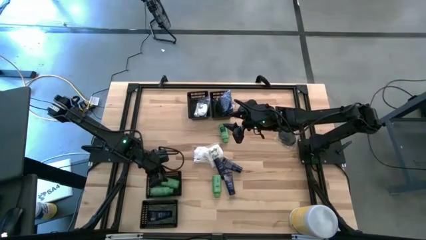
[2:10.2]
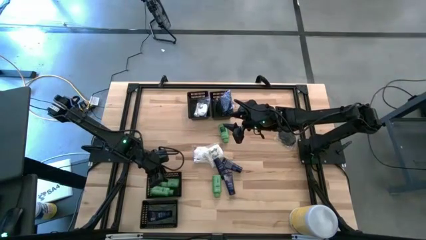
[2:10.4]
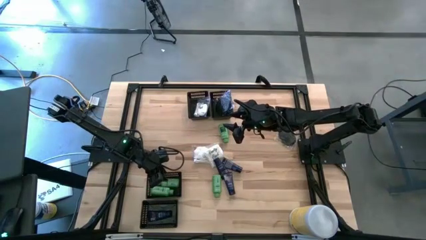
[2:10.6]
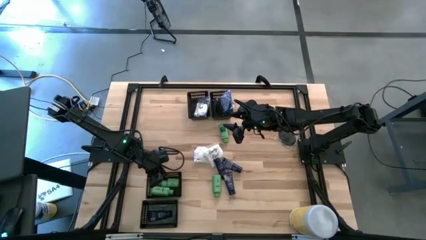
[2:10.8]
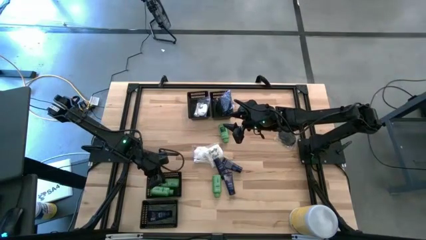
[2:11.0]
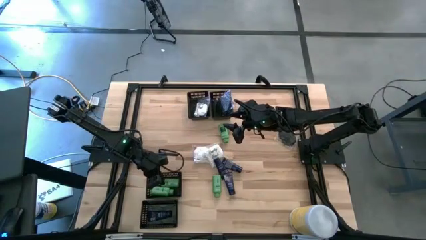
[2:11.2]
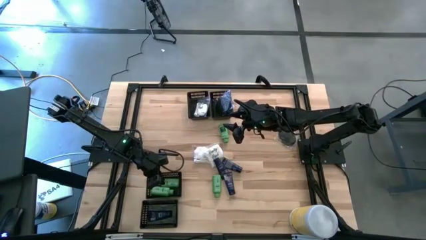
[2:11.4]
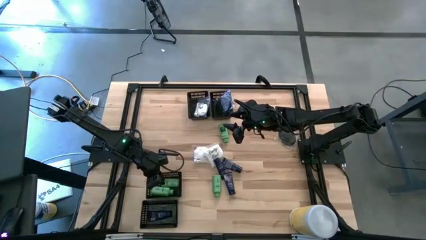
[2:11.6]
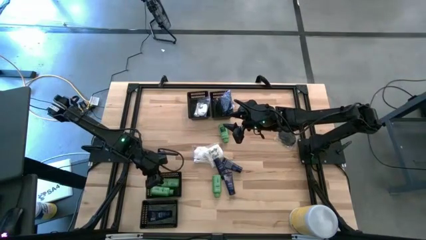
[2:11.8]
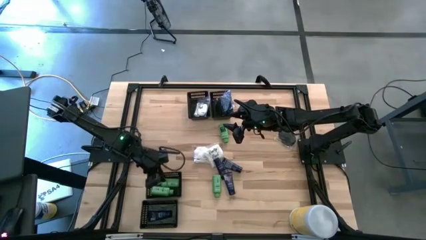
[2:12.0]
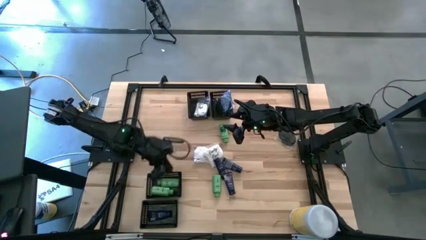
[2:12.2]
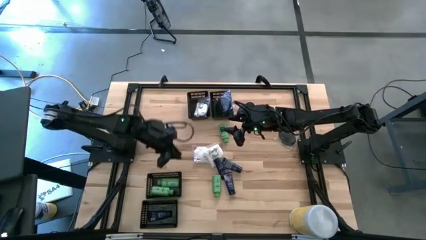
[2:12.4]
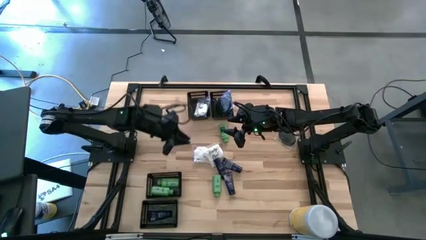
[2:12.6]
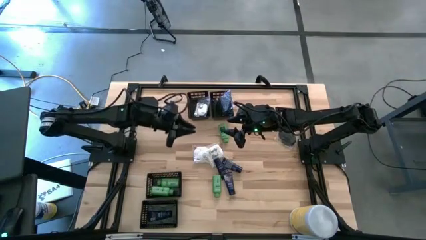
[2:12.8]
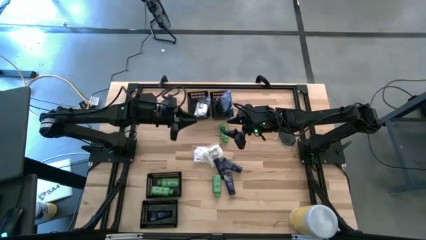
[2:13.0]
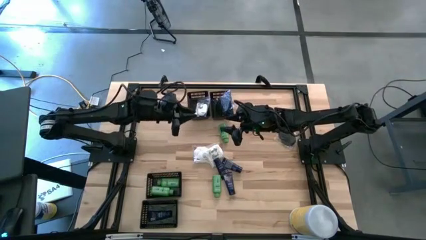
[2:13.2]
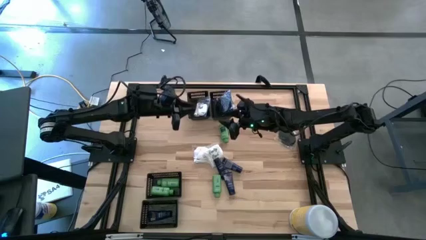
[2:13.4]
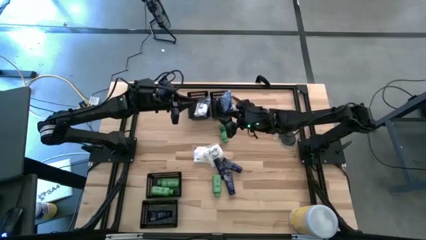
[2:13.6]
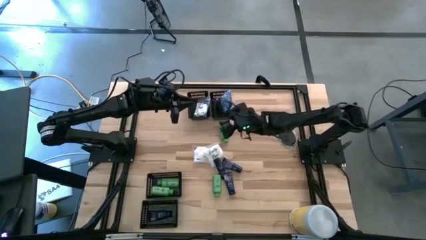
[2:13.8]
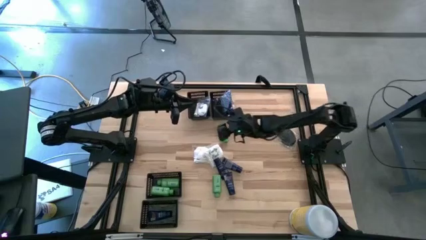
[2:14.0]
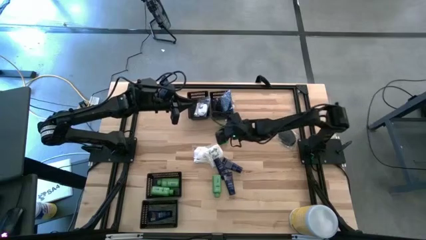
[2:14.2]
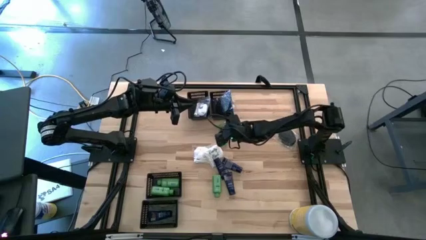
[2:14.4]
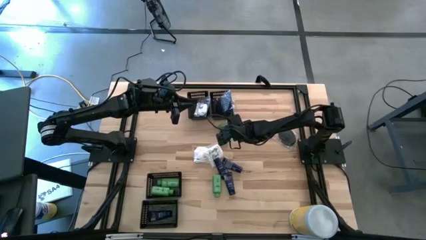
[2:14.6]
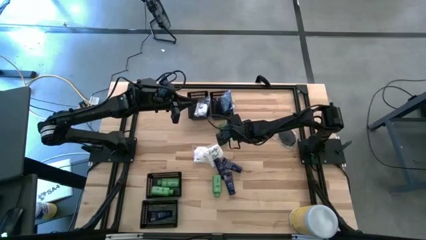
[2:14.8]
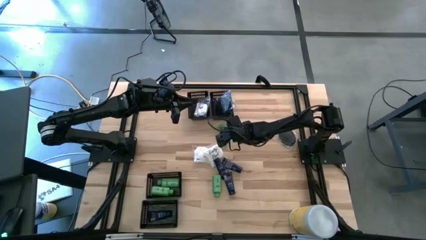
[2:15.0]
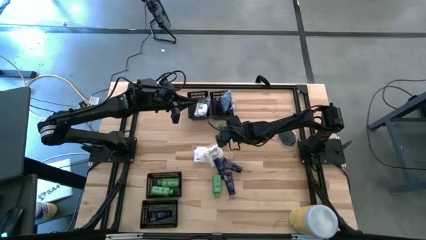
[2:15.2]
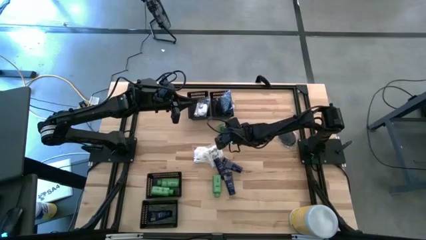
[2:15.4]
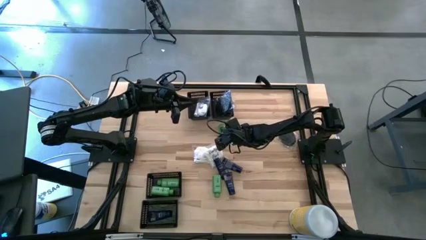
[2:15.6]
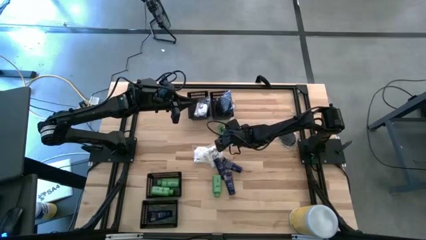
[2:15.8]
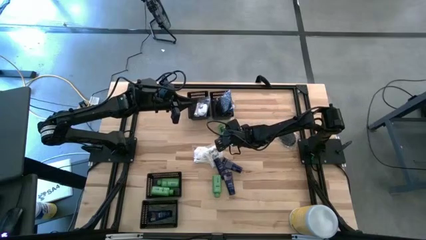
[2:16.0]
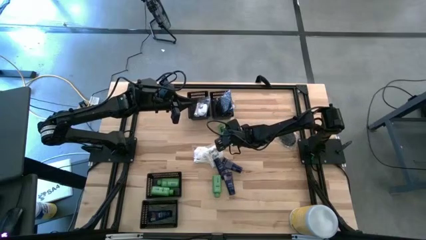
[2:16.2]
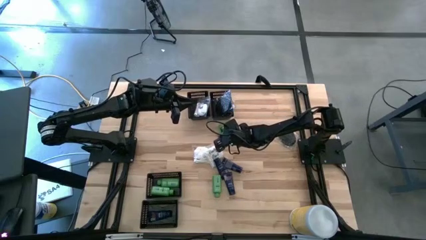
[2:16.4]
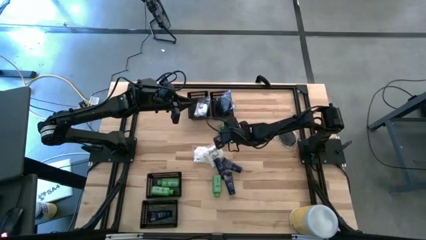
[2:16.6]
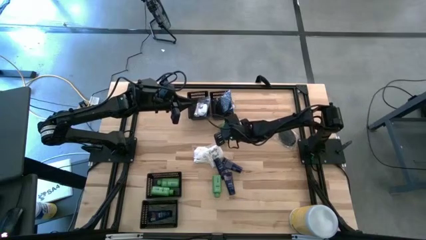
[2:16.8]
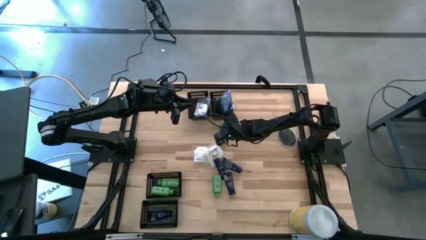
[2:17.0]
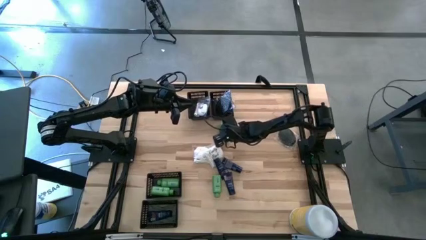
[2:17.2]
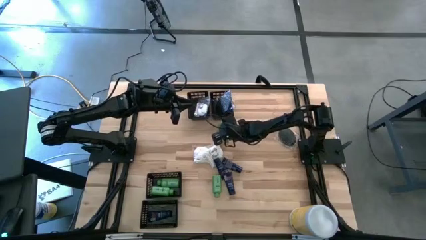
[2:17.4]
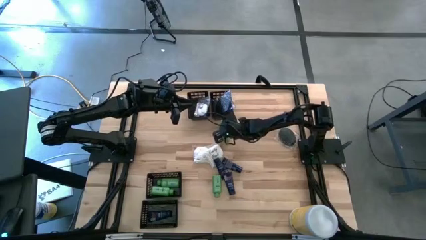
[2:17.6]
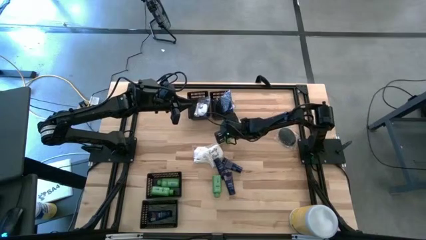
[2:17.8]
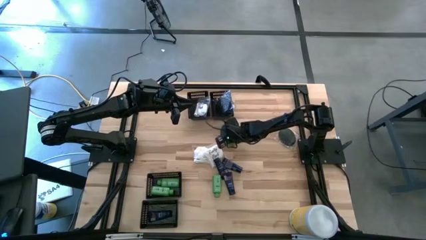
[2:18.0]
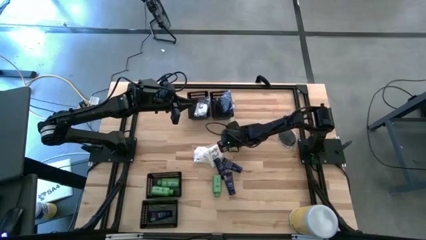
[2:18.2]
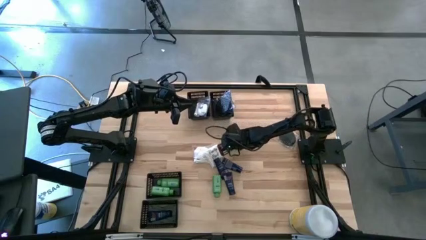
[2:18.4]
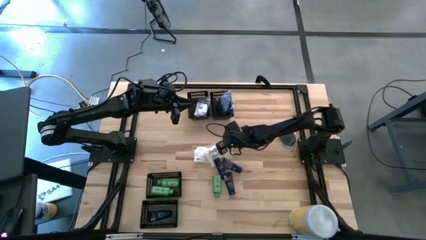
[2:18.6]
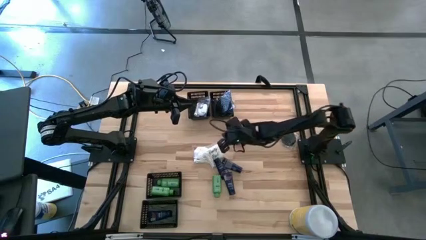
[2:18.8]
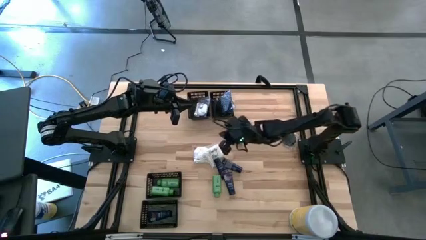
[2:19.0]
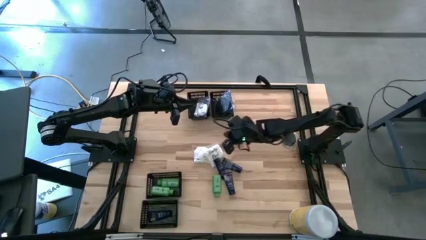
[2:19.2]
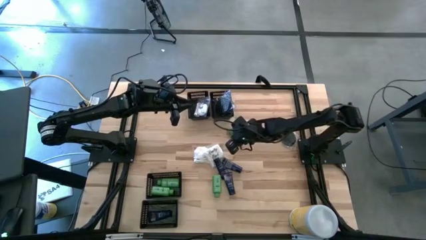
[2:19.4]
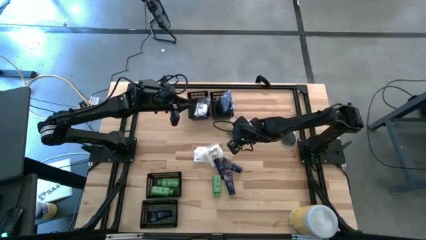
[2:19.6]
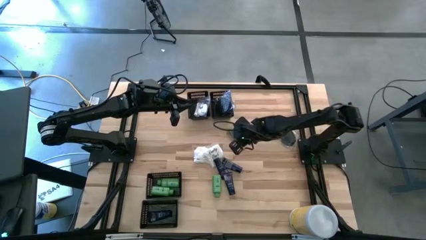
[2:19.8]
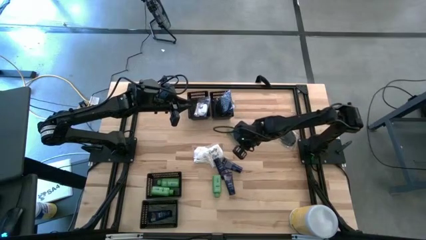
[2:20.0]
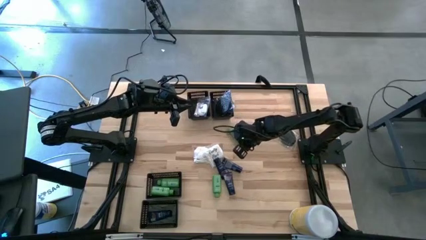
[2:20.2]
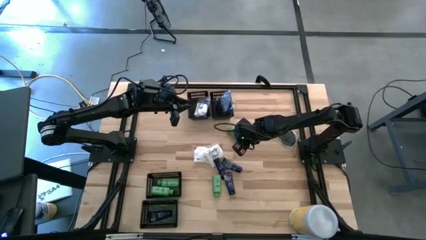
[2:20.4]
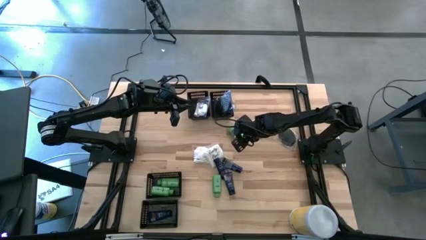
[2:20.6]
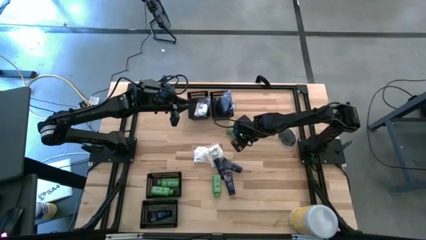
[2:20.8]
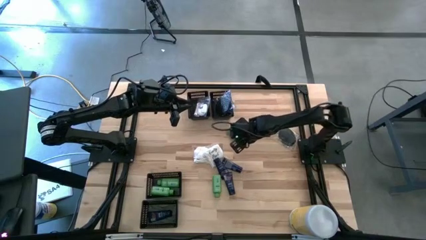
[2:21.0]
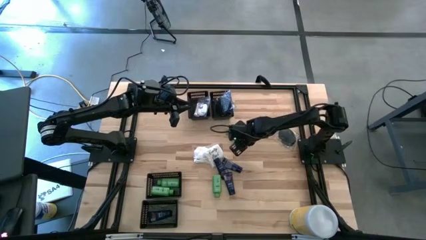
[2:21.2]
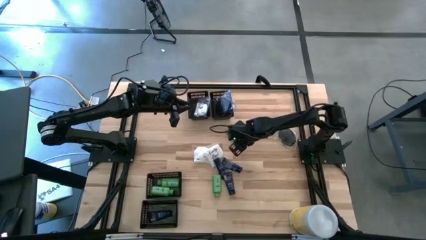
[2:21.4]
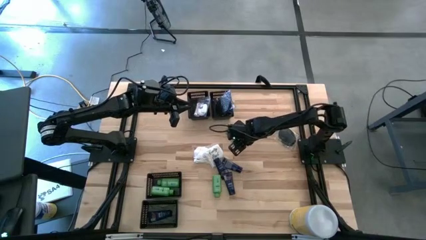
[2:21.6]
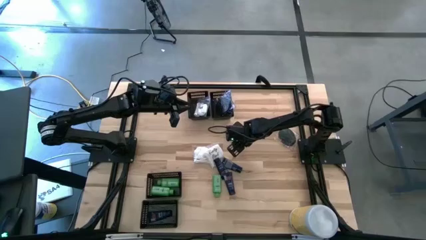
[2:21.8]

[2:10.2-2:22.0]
Task: Pick & Place Travel size toiletries
Put the green shampoo into the middle left basket
